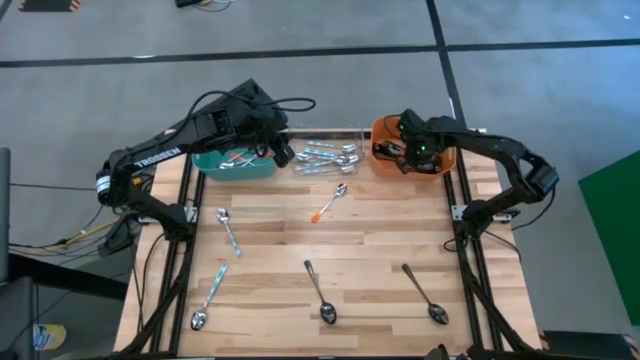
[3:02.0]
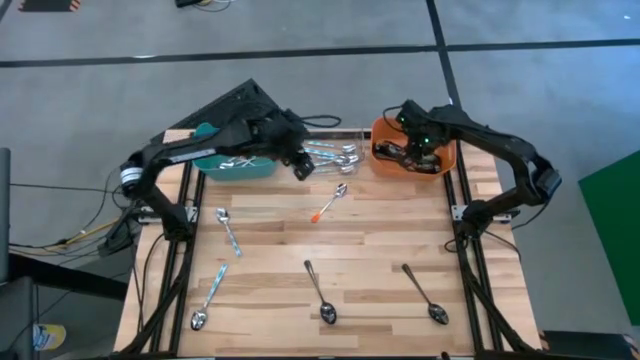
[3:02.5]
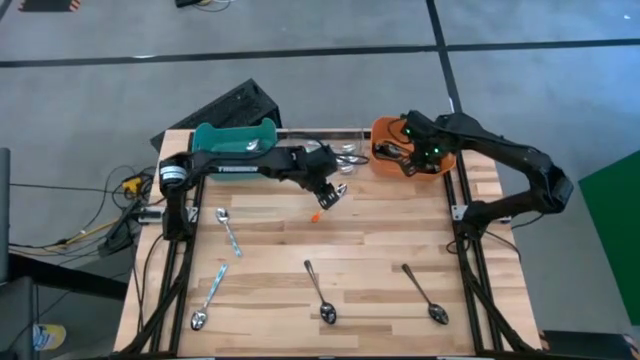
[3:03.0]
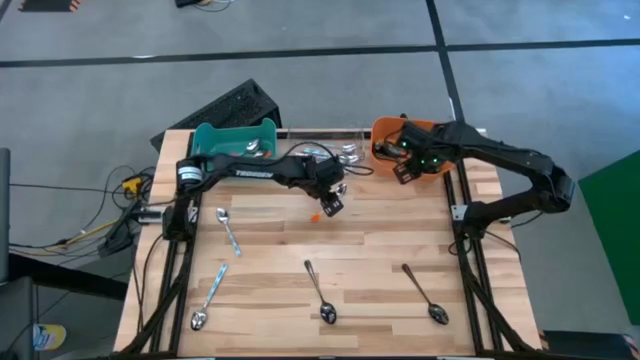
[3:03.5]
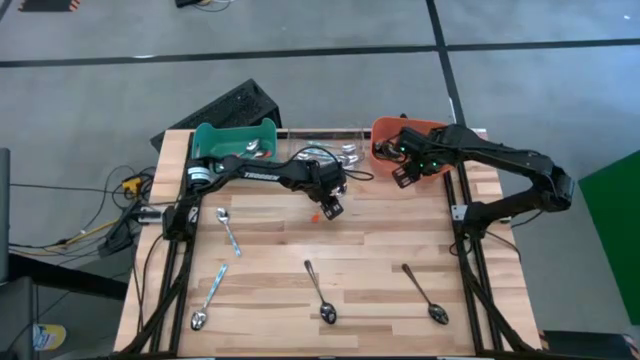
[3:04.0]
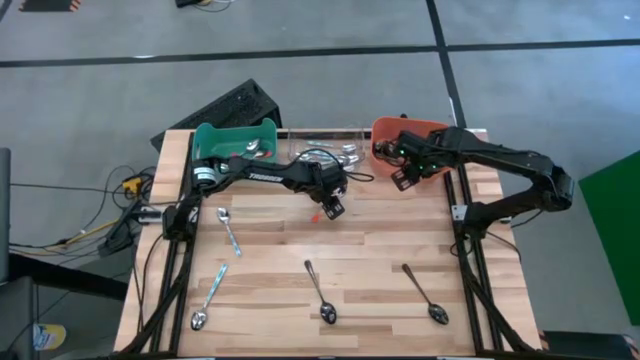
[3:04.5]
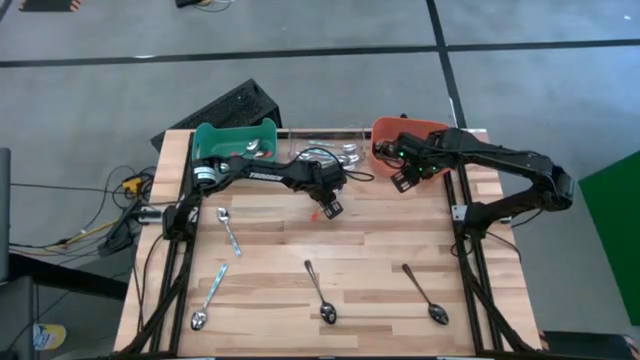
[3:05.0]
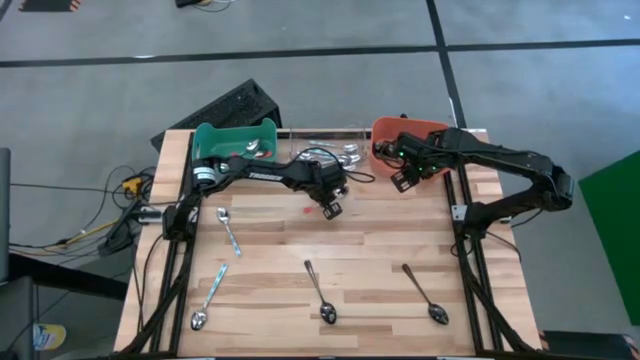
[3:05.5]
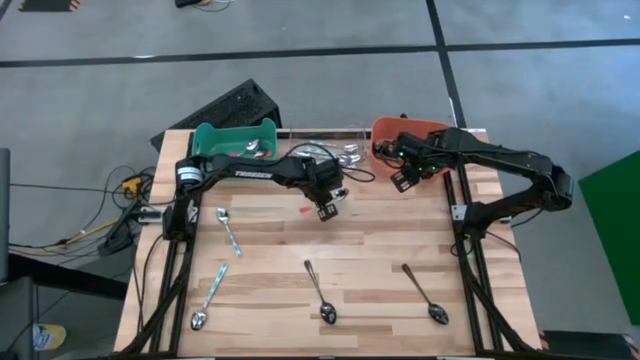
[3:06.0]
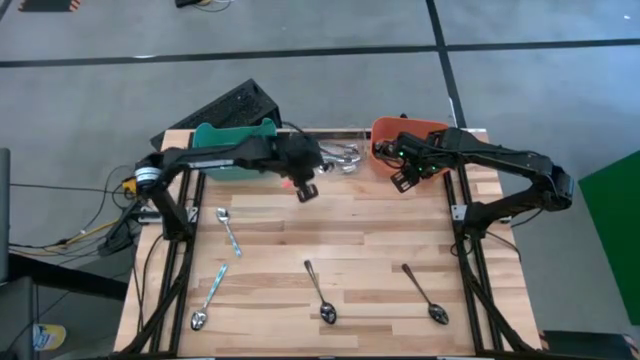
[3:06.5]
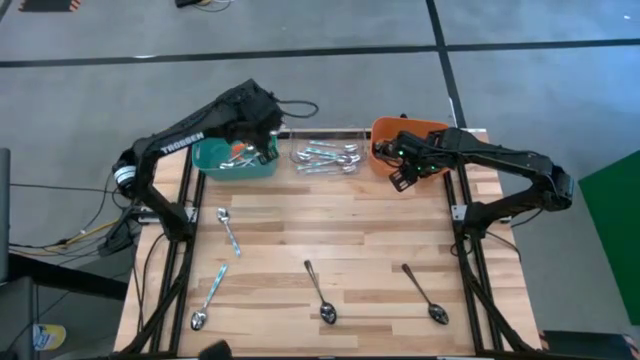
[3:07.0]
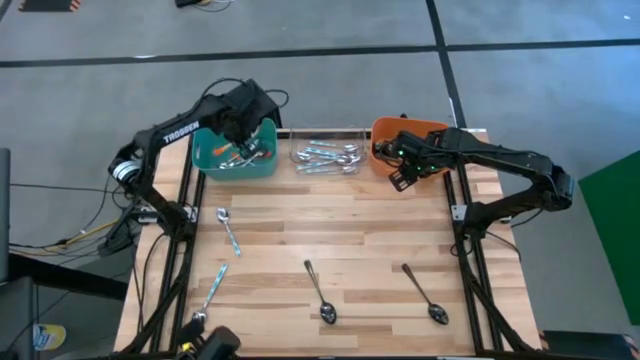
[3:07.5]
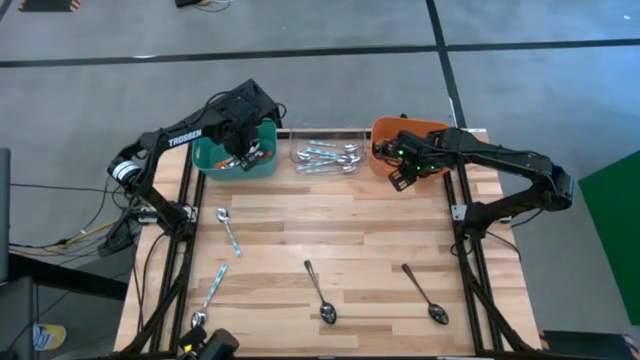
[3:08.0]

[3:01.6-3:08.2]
Task: Sort silverware by color (type)
Put the orange spoon into the green bin

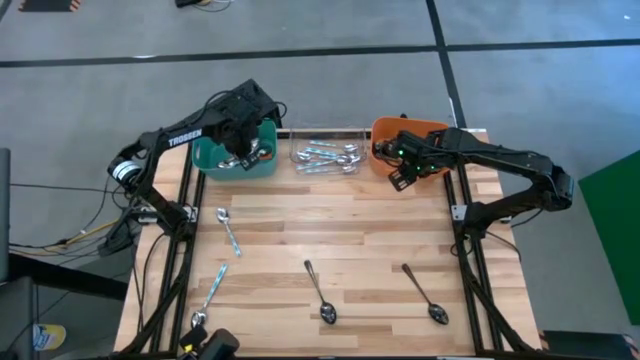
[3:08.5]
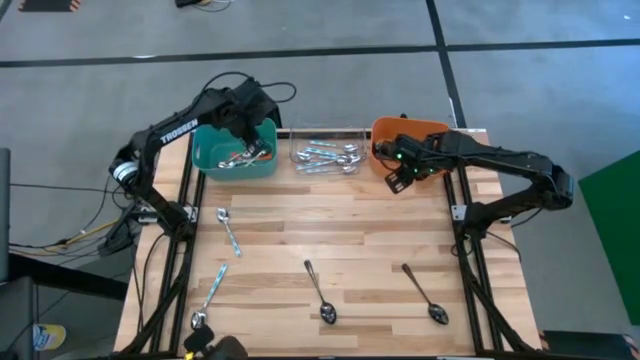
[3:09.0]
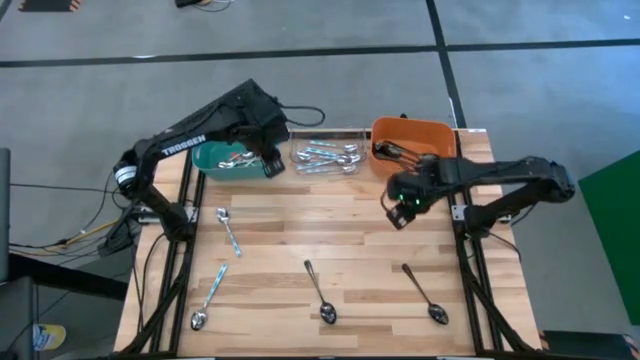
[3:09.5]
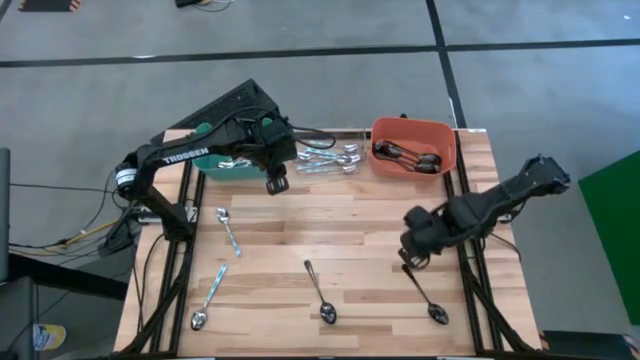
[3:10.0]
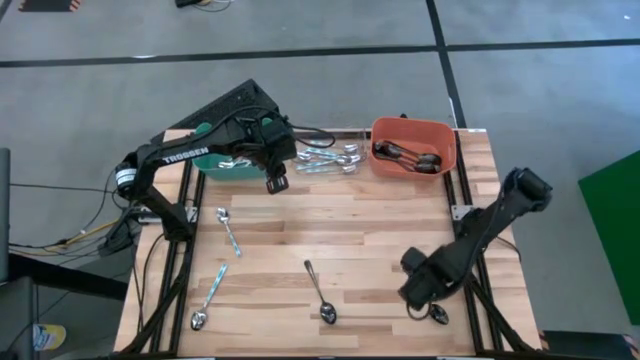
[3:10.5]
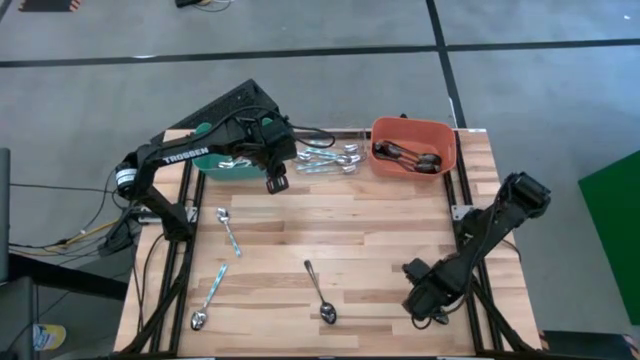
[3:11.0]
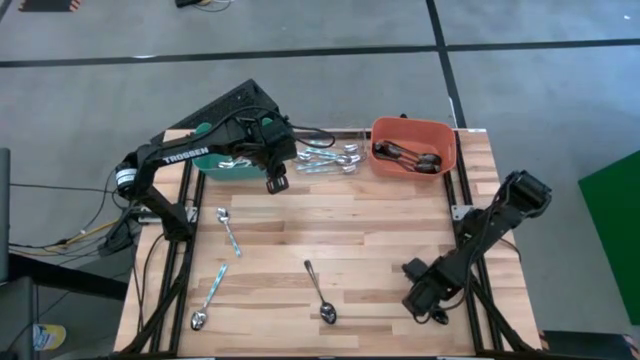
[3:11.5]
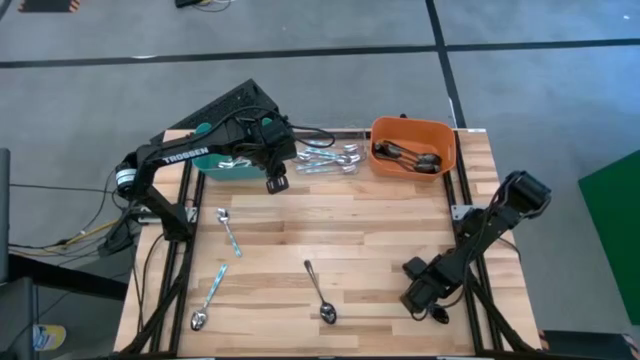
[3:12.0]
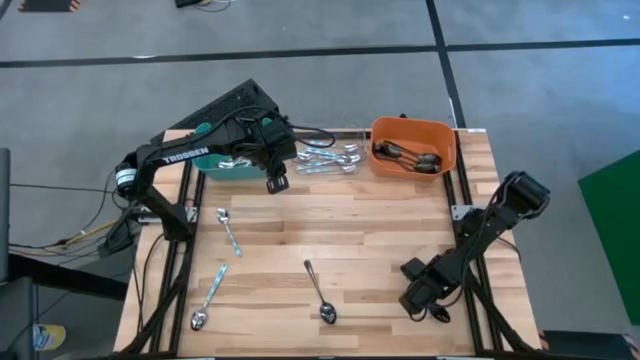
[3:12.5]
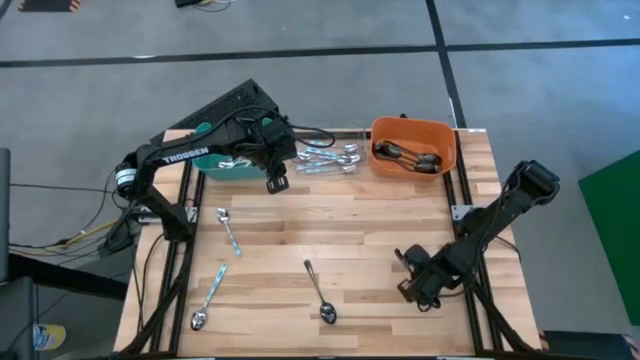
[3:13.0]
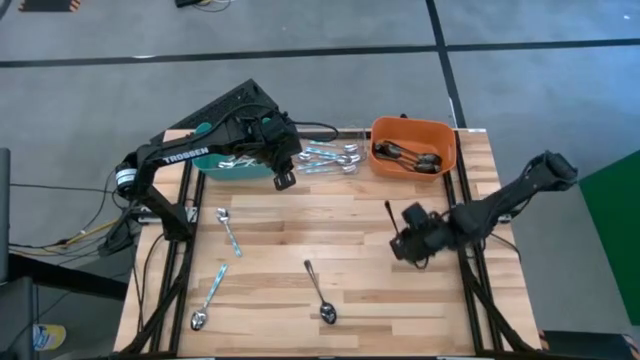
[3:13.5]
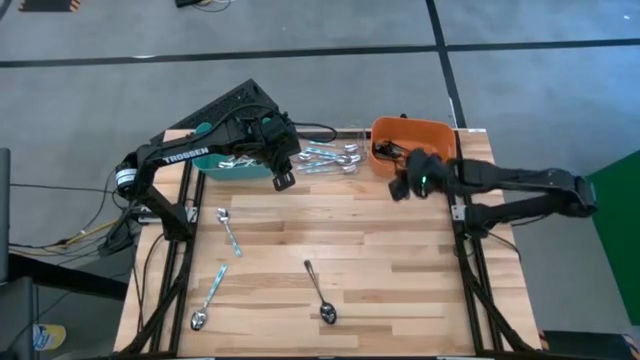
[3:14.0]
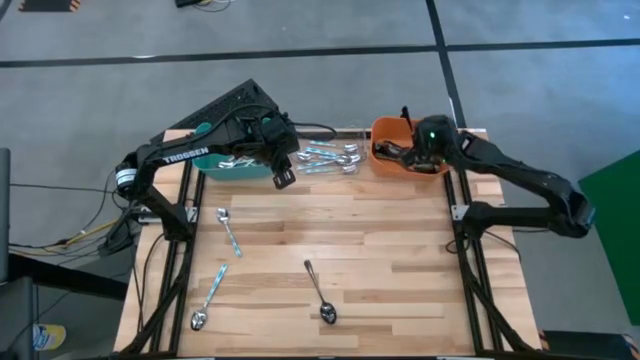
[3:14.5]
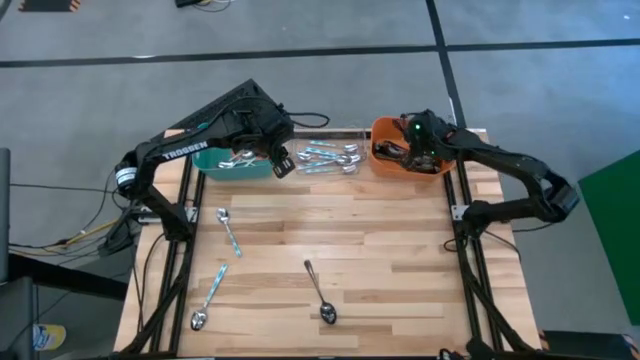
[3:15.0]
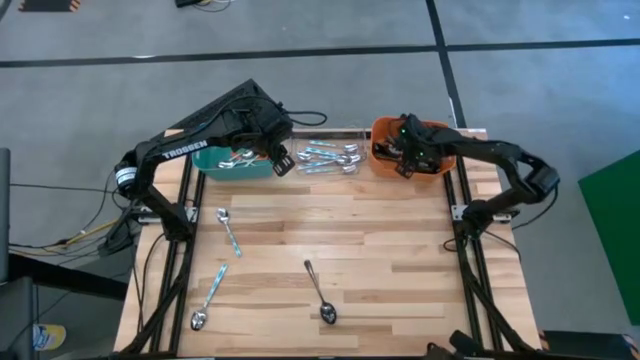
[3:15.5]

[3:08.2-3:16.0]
Put the black spoon into the orange bin

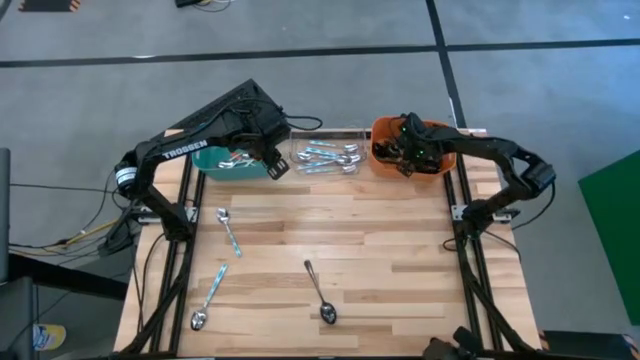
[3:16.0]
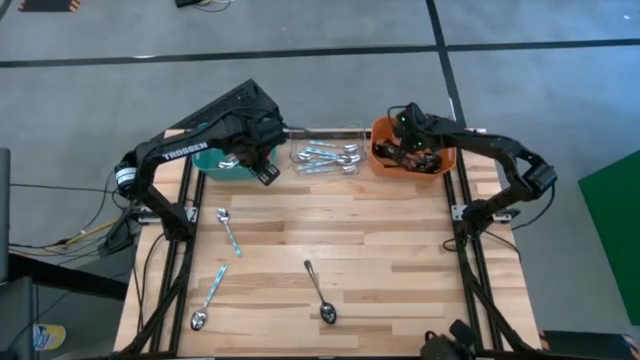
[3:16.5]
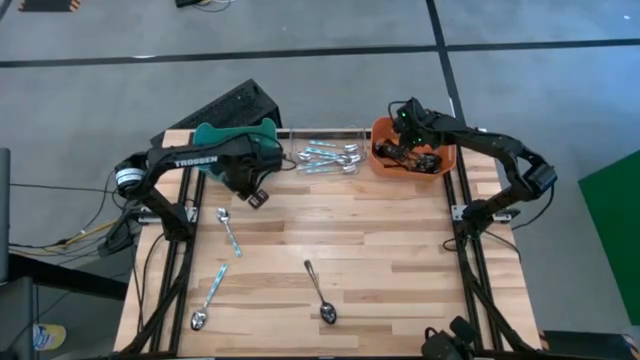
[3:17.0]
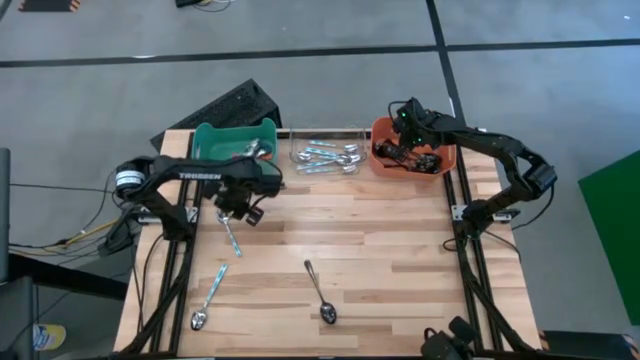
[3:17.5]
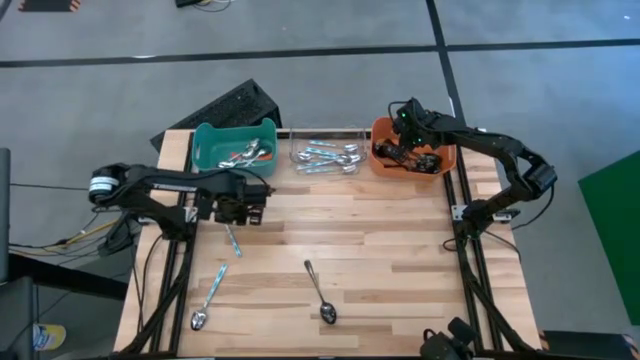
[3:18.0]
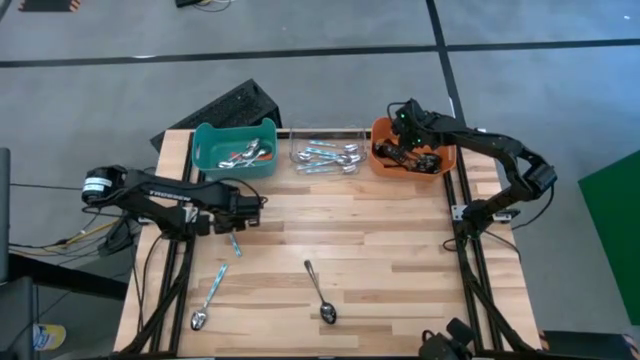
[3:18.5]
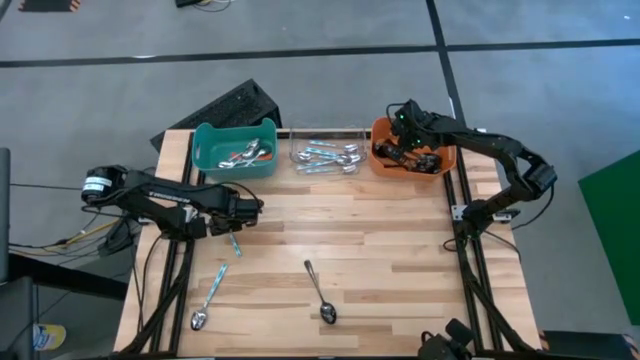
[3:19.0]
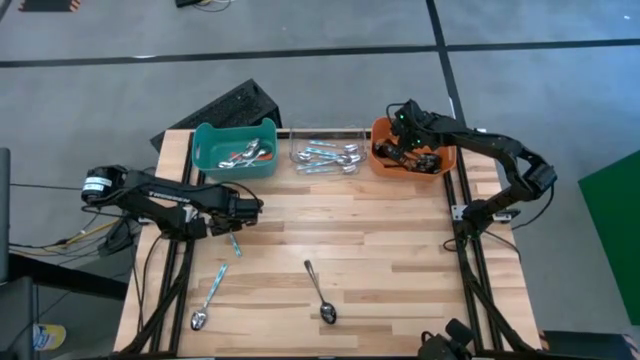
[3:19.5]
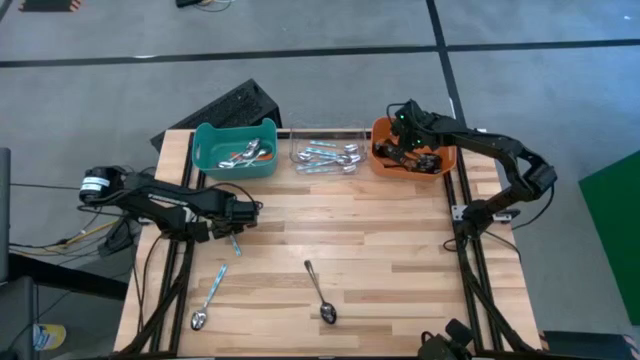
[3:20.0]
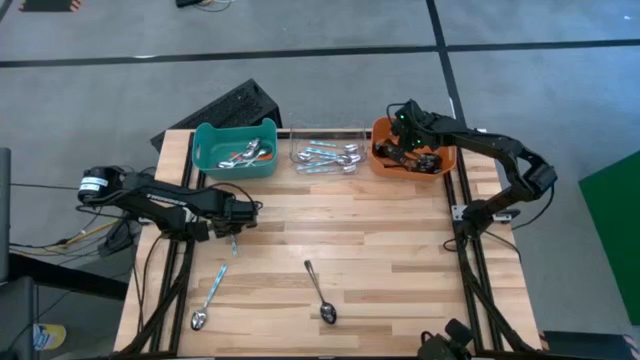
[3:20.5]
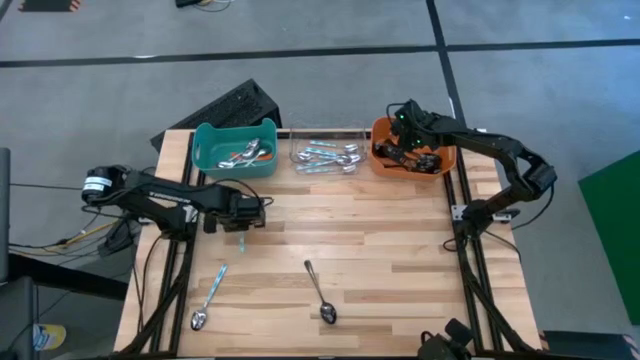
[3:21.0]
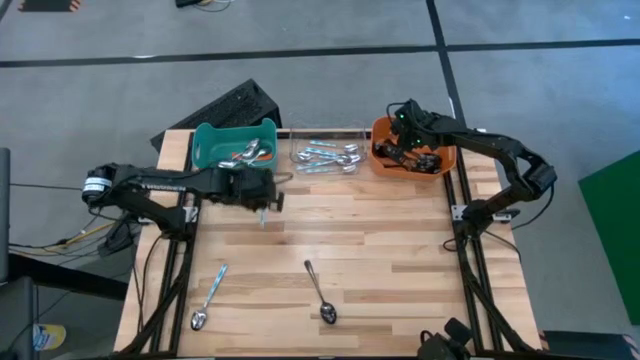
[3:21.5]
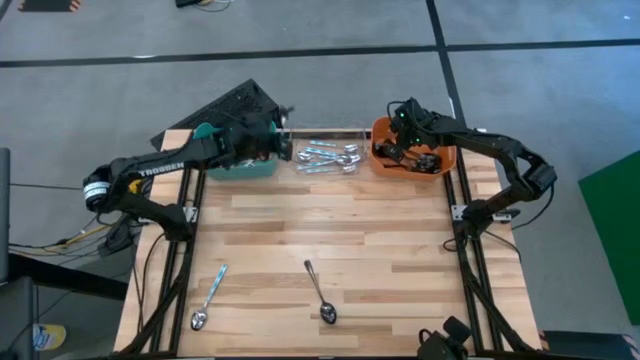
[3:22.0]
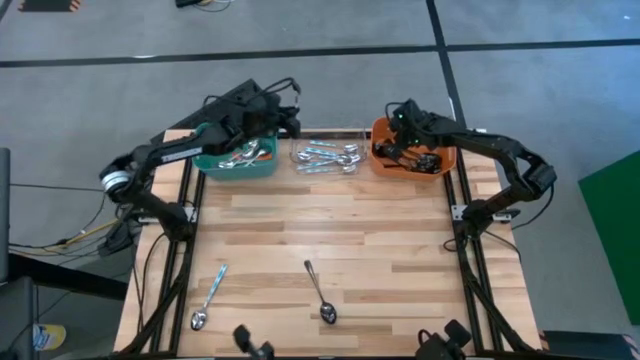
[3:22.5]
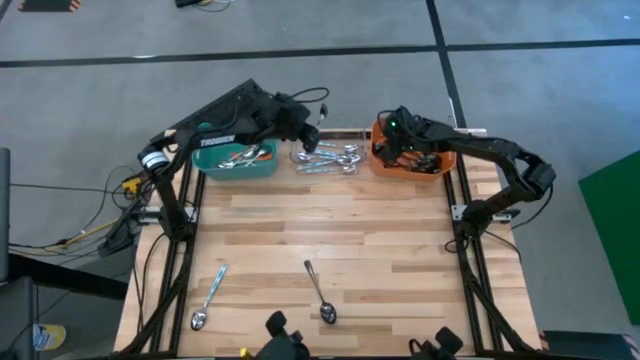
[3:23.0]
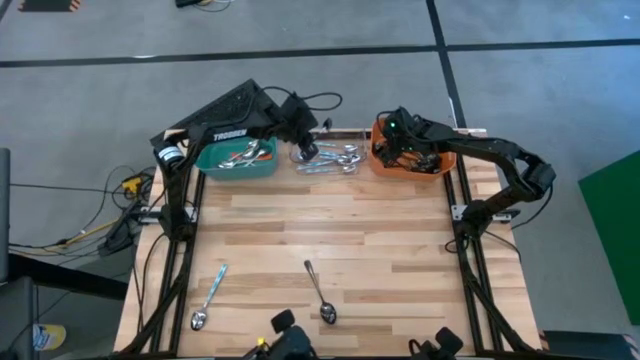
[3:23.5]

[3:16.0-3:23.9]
Put the blue spoon into the transparent bin
